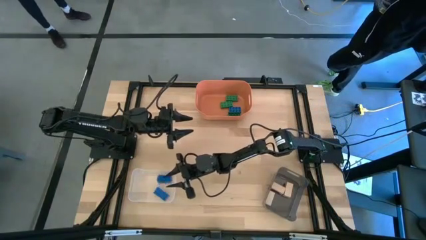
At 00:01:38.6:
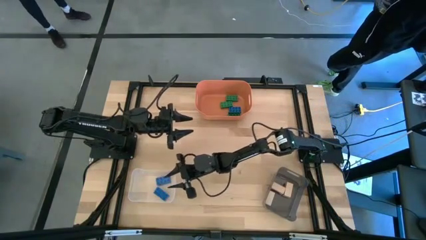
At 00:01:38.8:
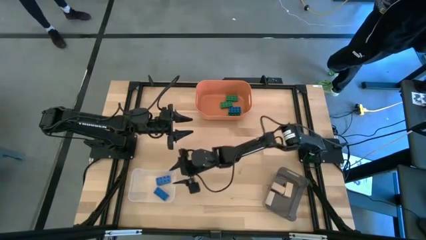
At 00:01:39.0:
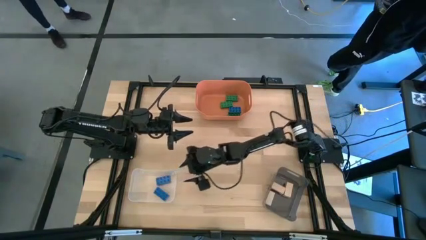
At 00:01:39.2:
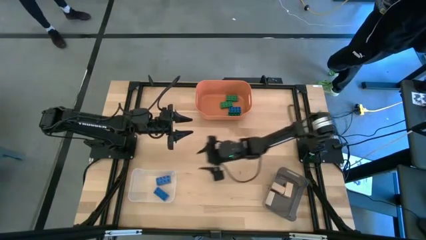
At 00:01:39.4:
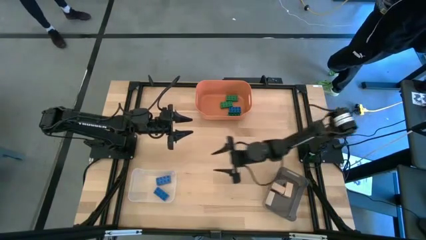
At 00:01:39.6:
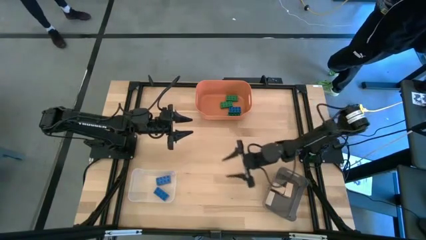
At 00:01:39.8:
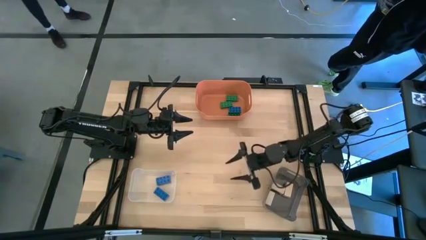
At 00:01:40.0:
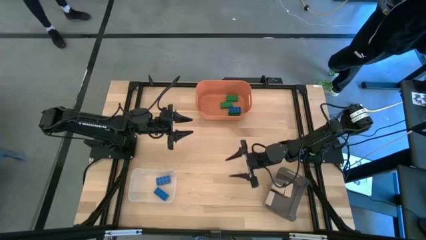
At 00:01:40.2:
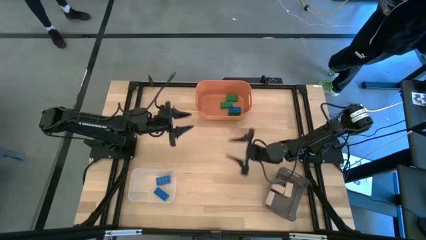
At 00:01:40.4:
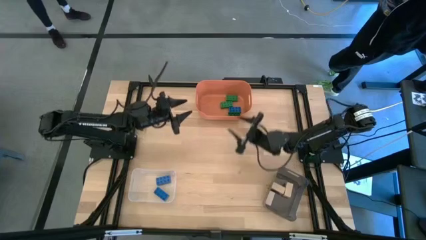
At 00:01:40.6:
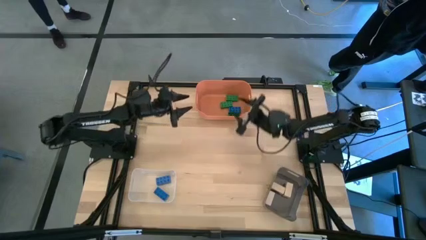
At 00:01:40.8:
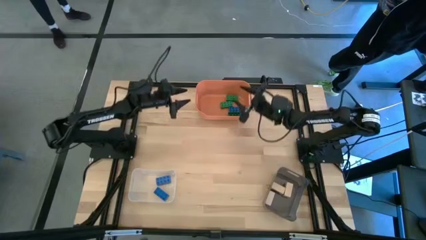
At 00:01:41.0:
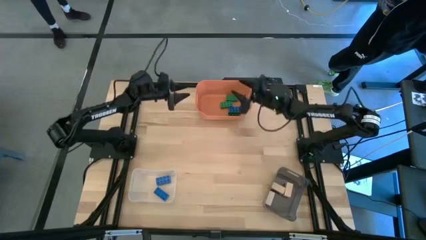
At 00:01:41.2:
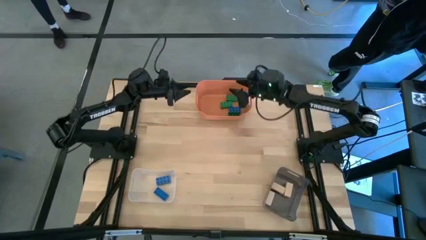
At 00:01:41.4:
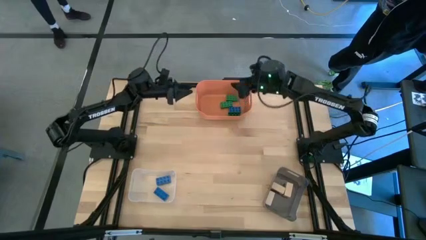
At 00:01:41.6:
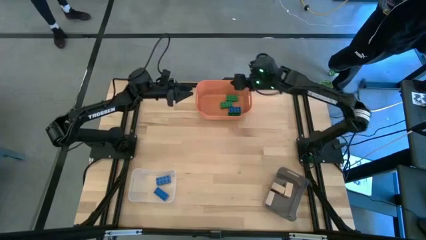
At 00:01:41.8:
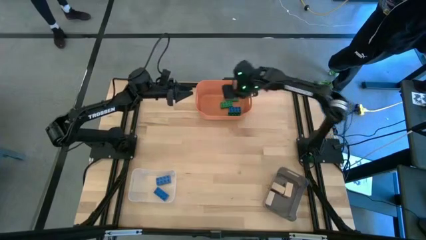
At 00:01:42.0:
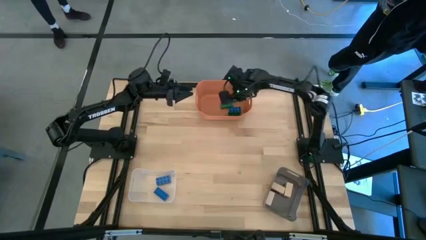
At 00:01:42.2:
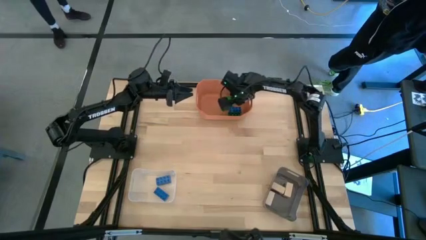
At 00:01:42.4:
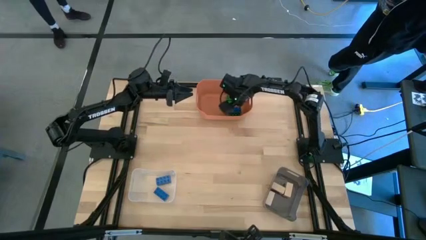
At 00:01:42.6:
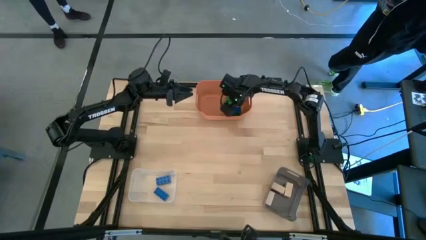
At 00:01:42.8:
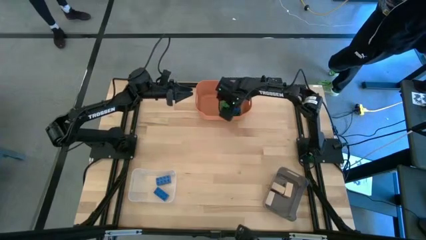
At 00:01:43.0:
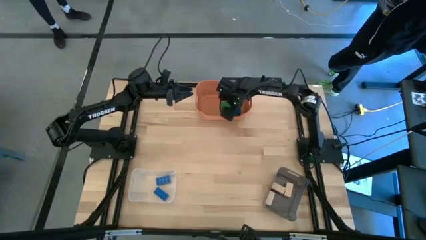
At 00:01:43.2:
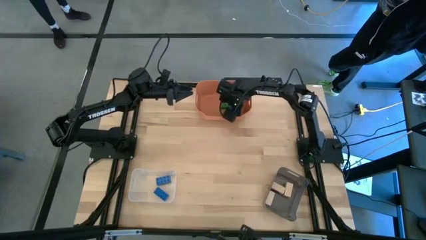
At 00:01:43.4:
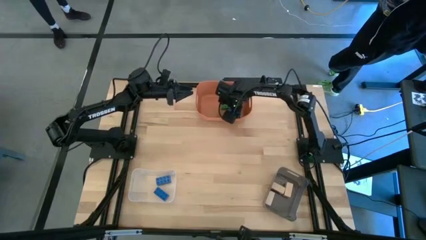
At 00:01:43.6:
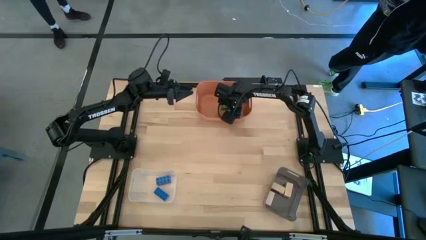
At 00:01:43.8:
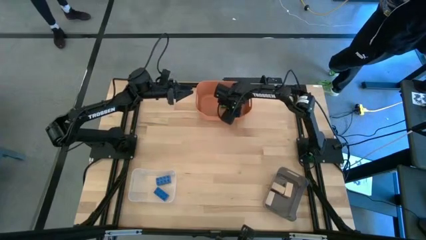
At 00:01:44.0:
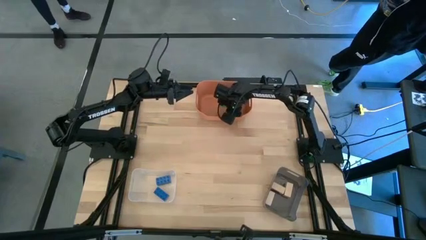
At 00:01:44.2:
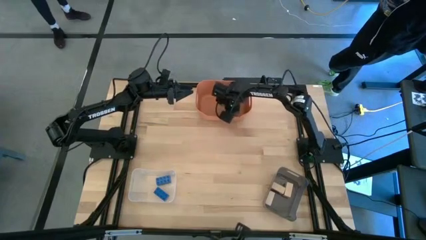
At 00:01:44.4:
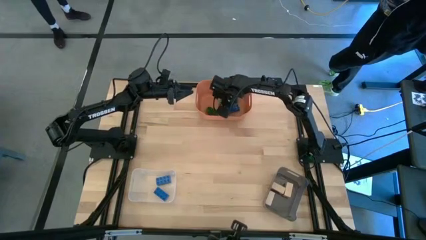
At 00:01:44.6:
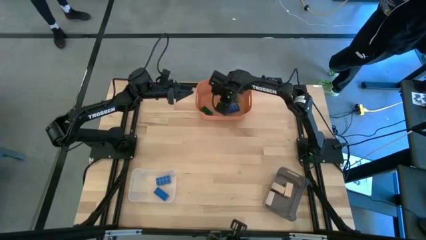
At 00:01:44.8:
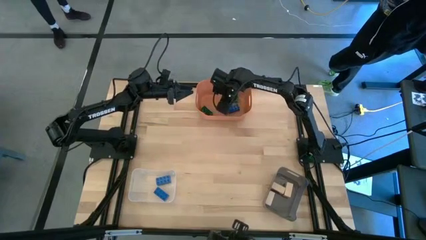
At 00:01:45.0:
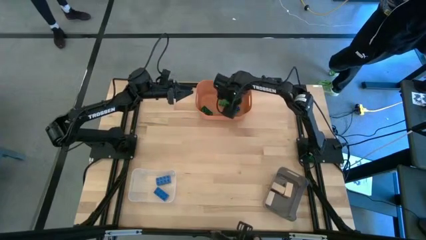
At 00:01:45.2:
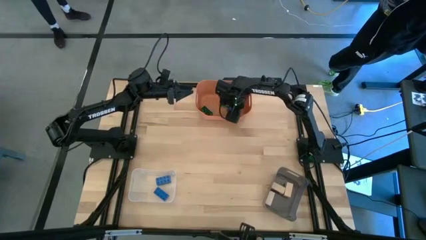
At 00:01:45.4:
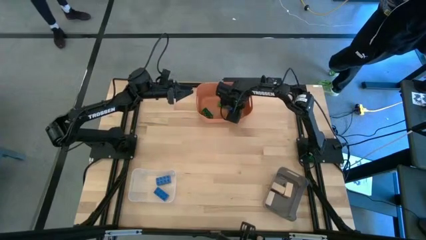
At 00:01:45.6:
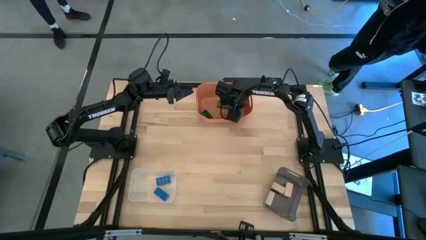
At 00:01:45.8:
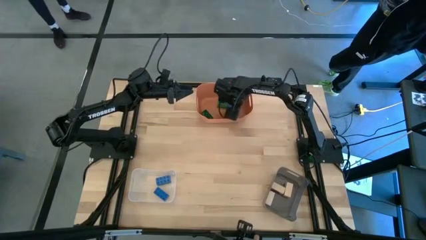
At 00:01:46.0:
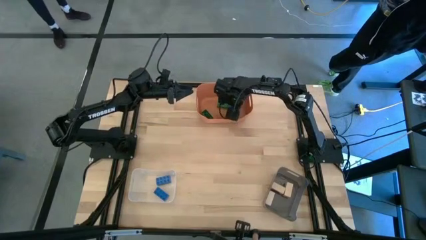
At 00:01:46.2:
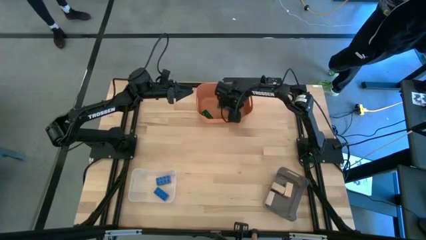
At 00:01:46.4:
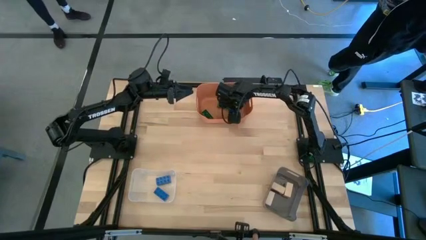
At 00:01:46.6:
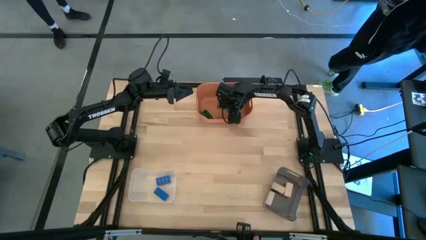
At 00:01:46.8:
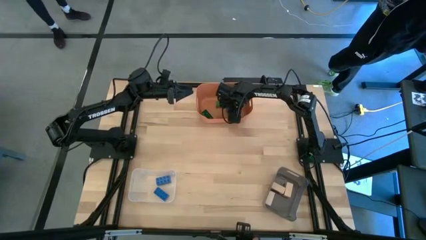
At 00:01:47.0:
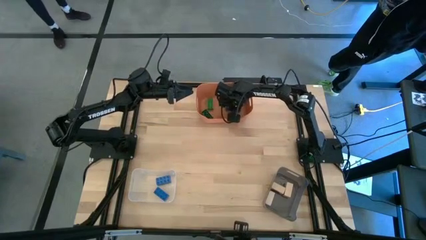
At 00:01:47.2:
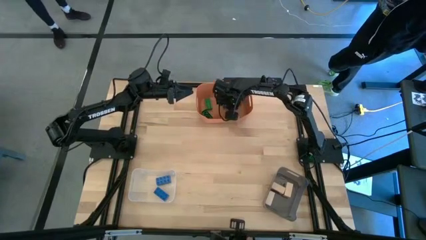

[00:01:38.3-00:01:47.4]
Task: Sort & place blocks by color
Put the blue 8 stud game piece into the white transparent bin

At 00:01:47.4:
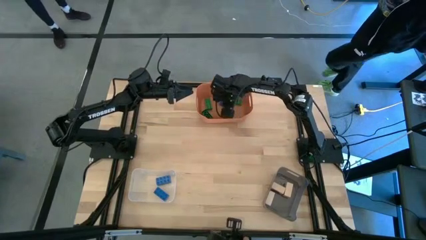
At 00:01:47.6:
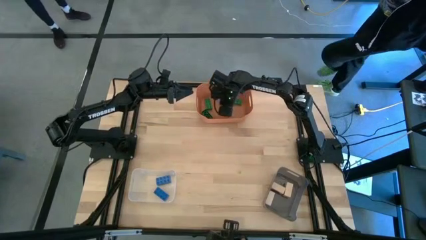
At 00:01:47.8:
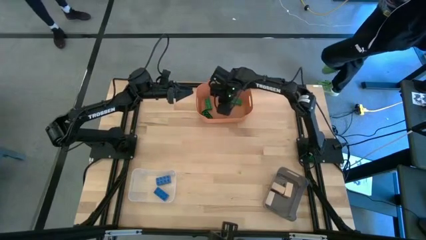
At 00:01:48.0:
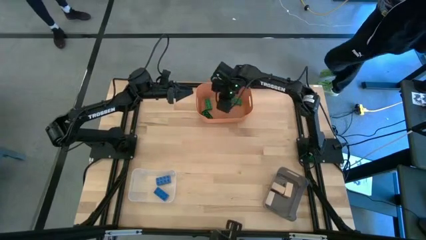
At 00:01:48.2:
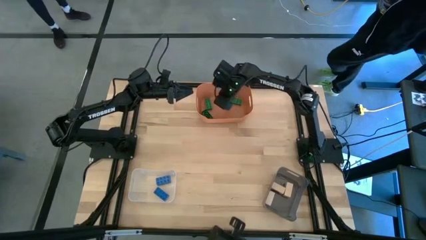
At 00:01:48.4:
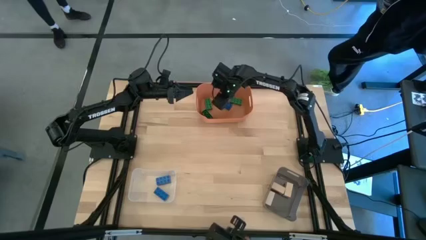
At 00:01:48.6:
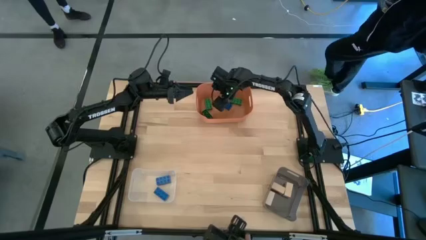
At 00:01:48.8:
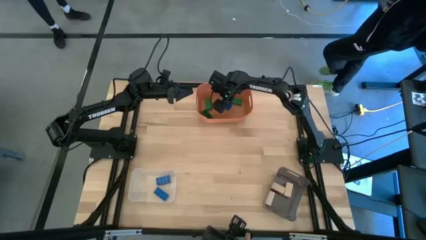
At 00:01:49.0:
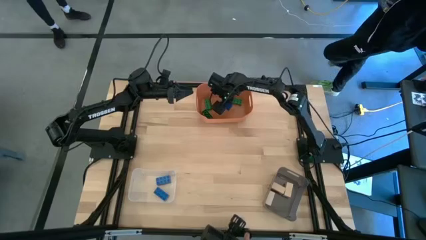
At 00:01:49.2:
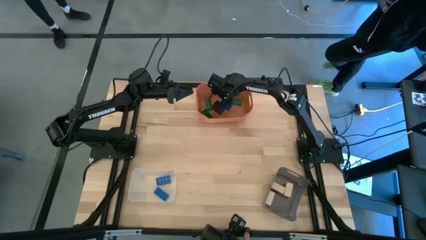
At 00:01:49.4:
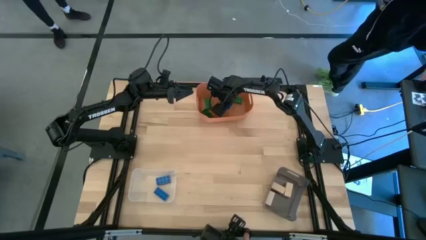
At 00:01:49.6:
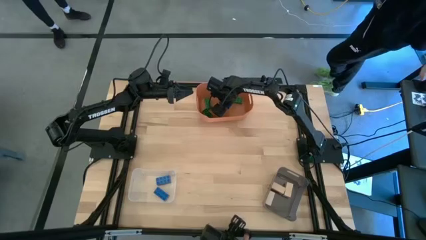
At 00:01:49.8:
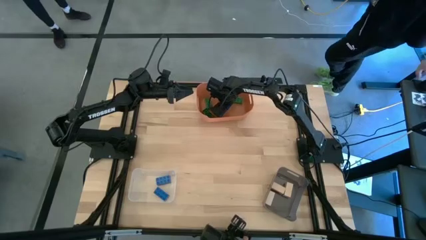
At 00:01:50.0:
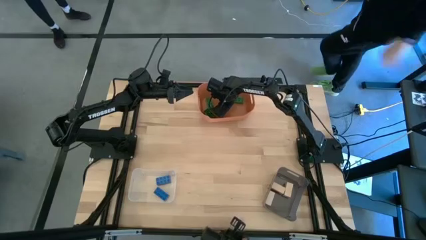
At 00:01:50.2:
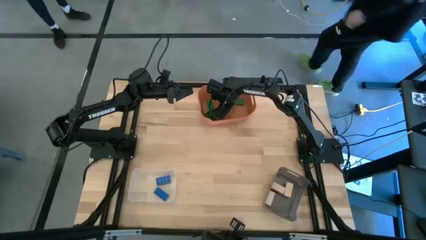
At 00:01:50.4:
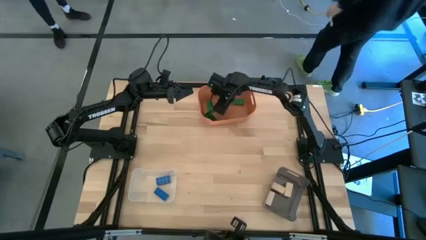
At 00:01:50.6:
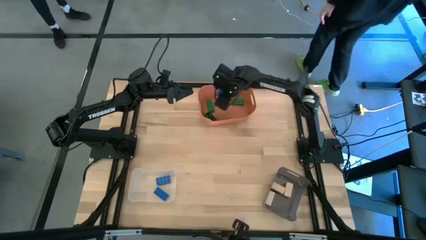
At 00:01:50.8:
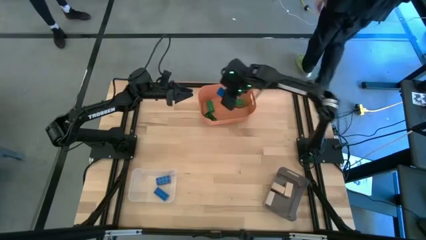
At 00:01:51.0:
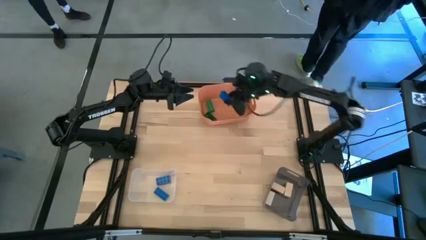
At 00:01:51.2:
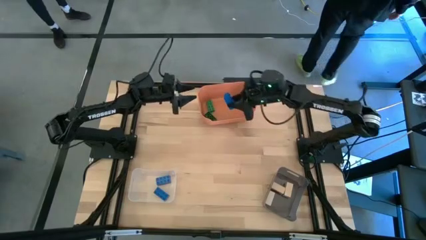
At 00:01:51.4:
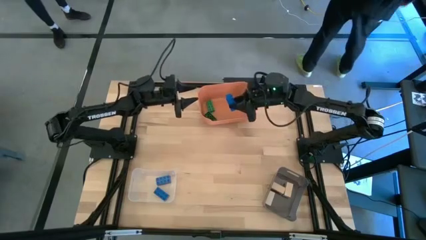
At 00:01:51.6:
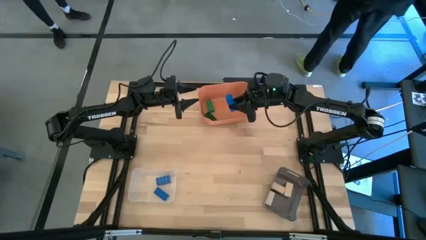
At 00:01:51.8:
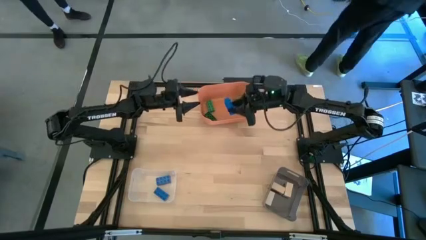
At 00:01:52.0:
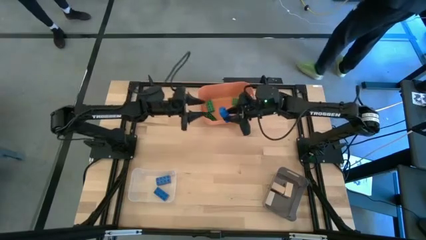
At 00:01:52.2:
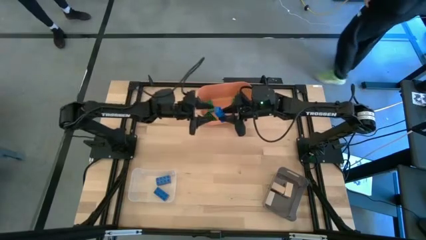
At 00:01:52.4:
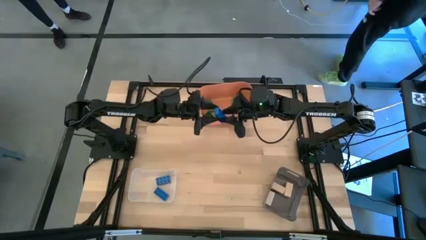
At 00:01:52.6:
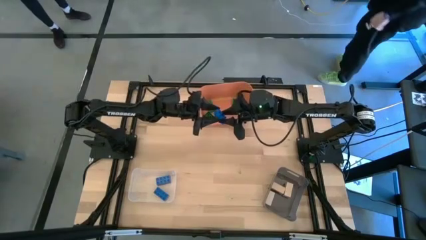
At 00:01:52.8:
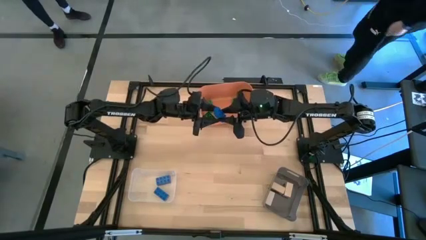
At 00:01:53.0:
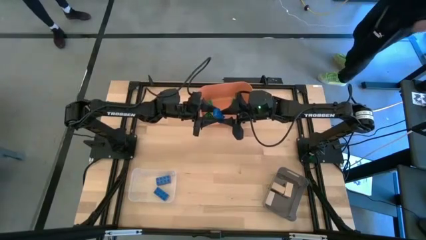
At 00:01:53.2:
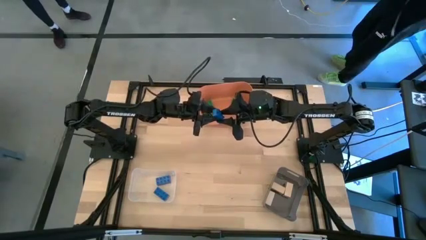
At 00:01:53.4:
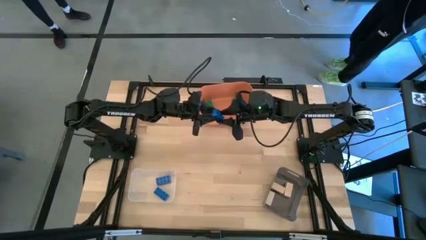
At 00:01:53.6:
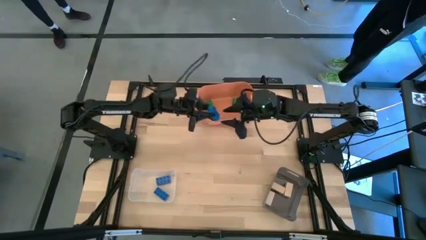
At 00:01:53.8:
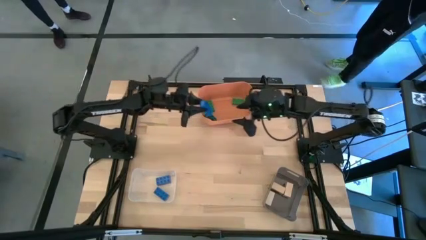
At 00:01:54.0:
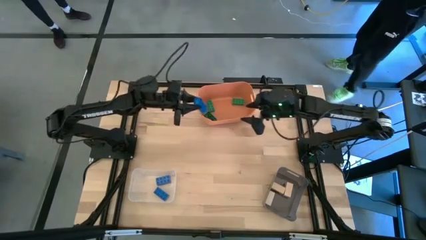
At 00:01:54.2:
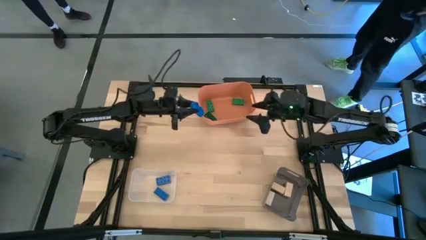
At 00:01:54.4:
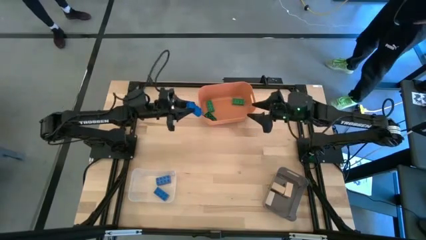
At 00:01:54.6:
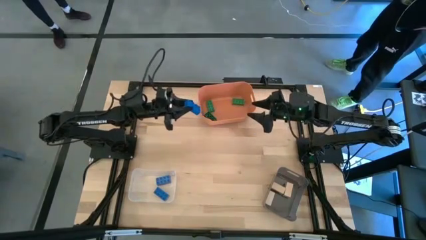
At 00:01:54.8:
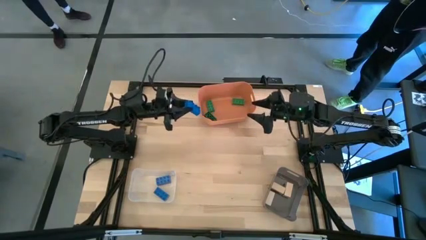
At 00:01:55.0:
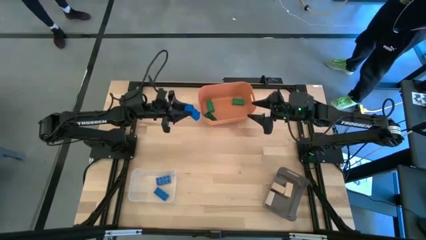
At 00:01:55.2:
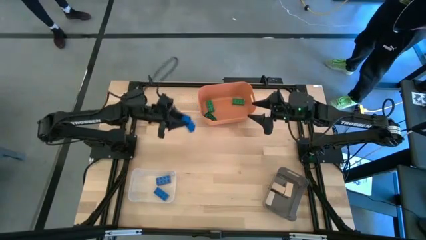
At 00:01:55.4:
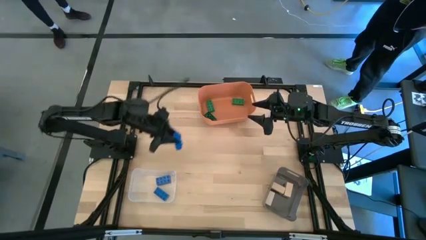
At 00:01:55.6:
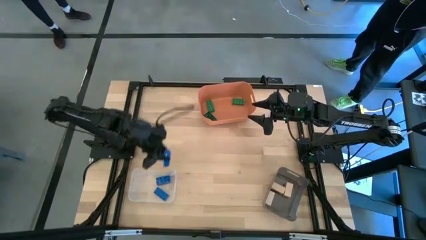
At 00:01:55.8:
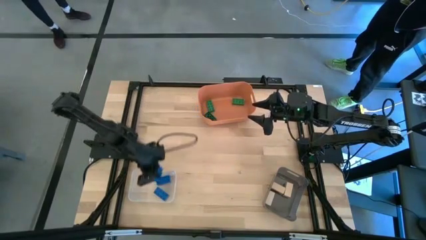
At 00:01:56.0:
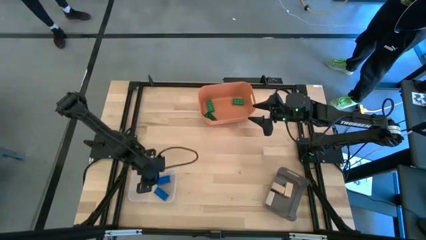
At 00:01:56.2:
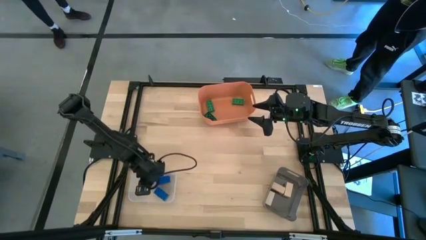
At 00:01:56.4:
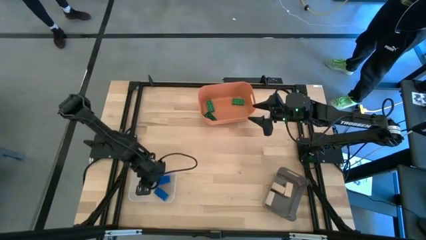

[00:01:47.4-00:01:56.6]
Put the top blue 8 stud game piece into the white transparent bin
